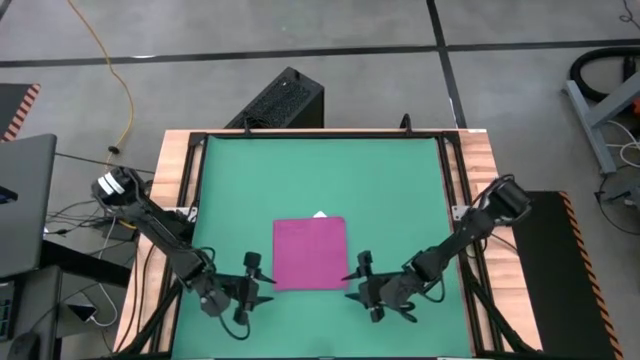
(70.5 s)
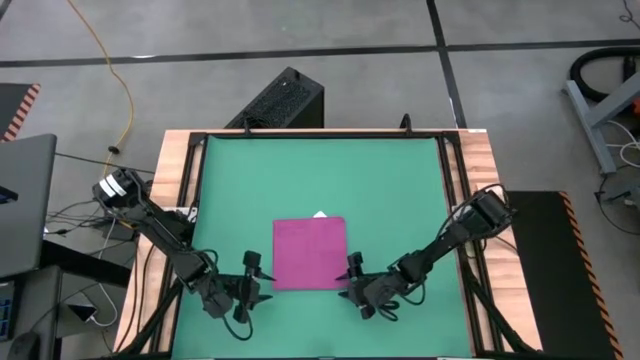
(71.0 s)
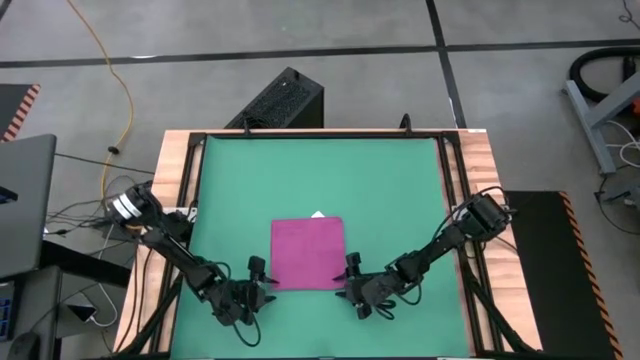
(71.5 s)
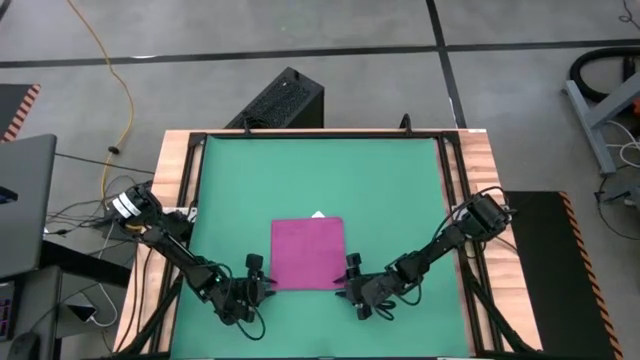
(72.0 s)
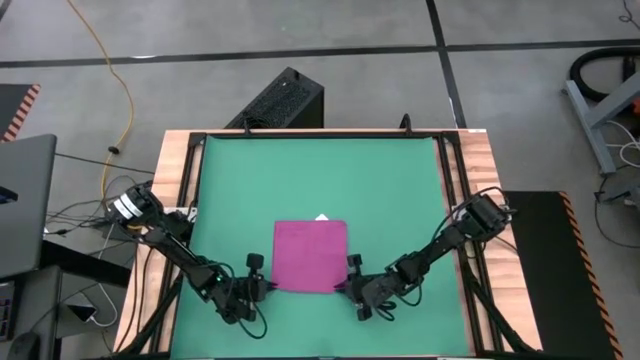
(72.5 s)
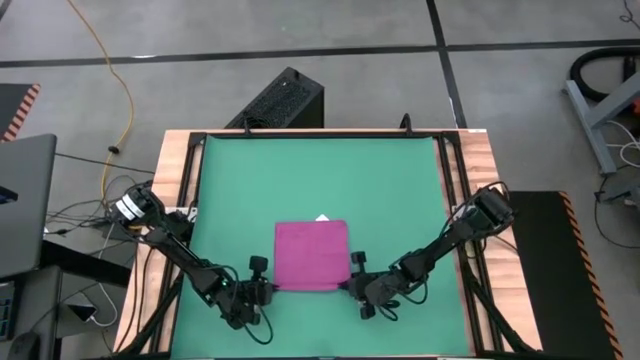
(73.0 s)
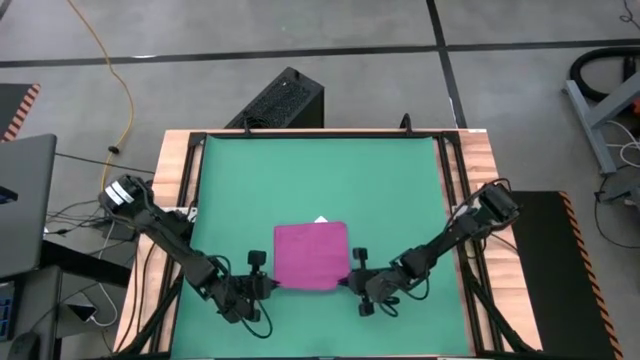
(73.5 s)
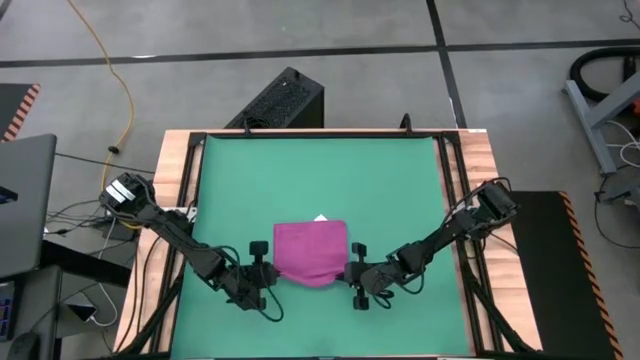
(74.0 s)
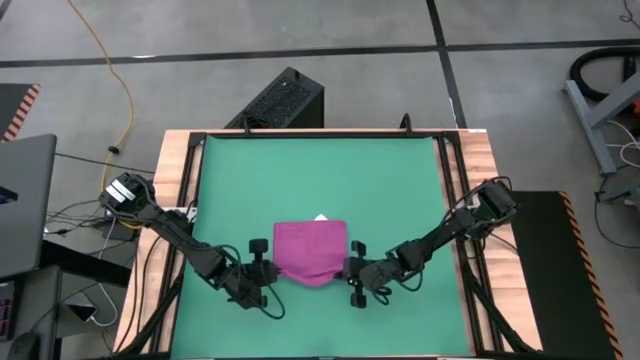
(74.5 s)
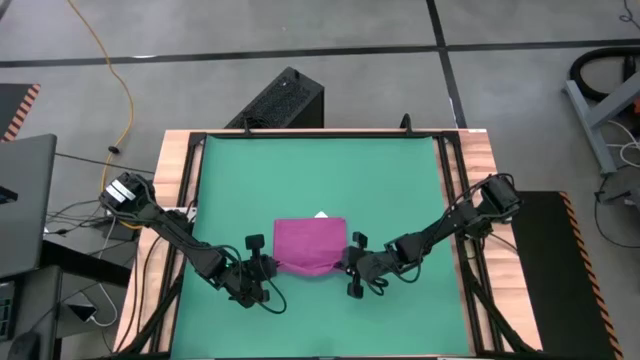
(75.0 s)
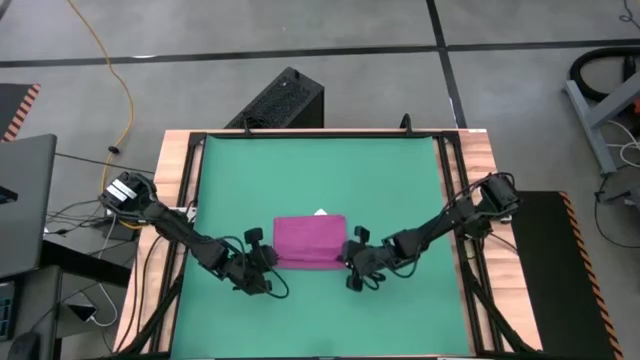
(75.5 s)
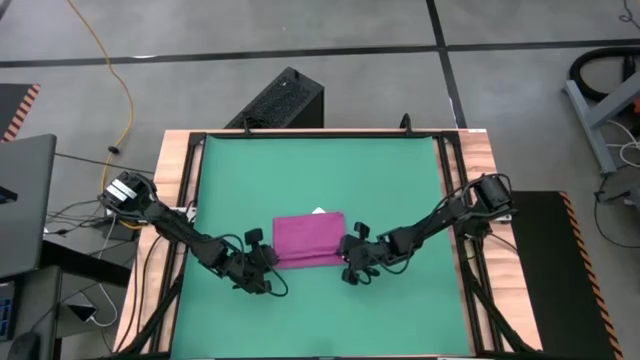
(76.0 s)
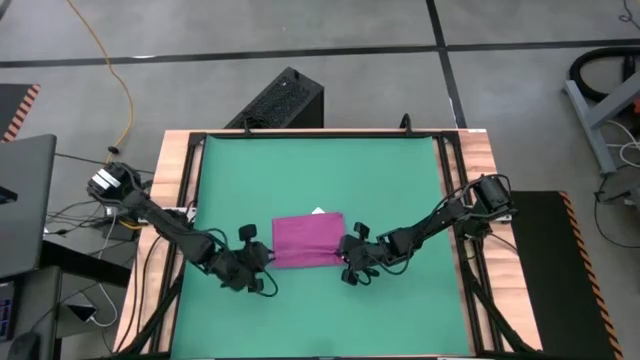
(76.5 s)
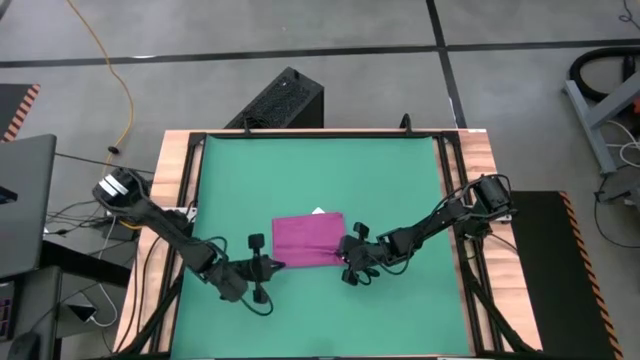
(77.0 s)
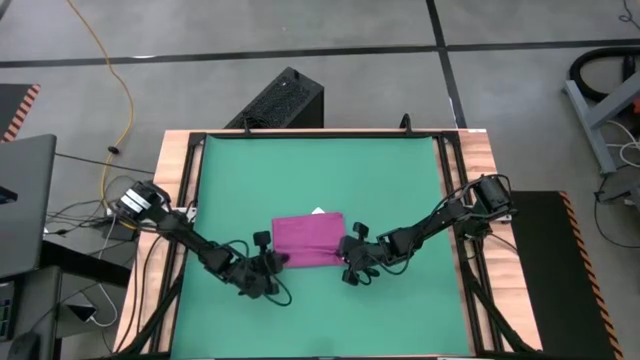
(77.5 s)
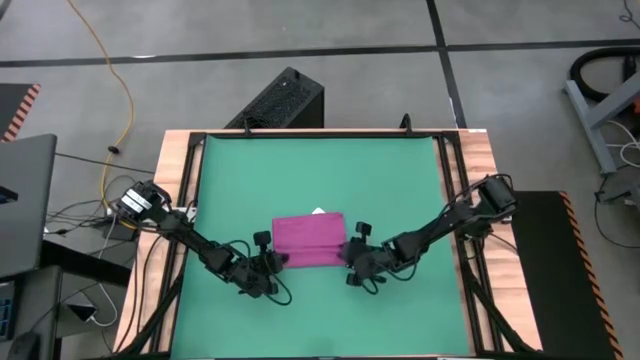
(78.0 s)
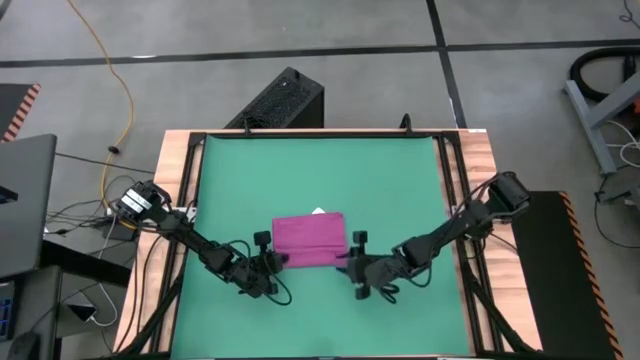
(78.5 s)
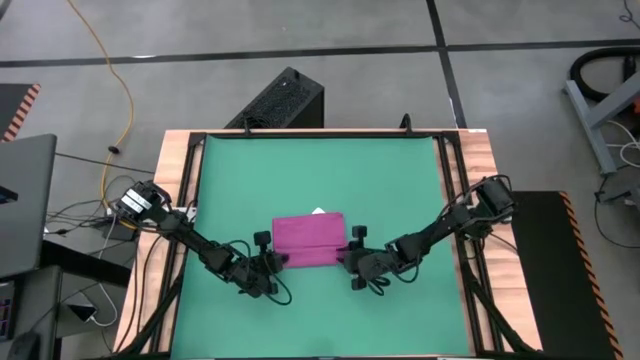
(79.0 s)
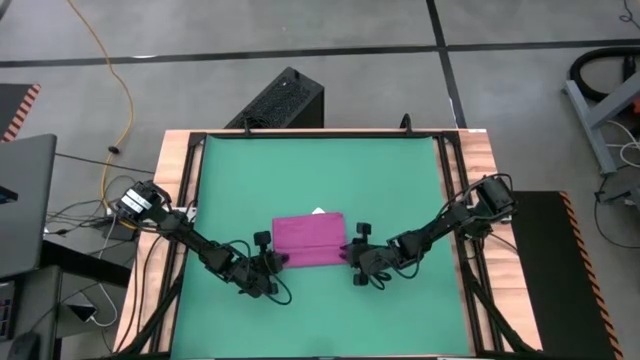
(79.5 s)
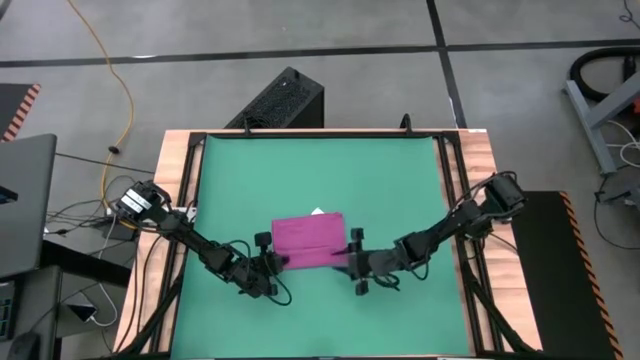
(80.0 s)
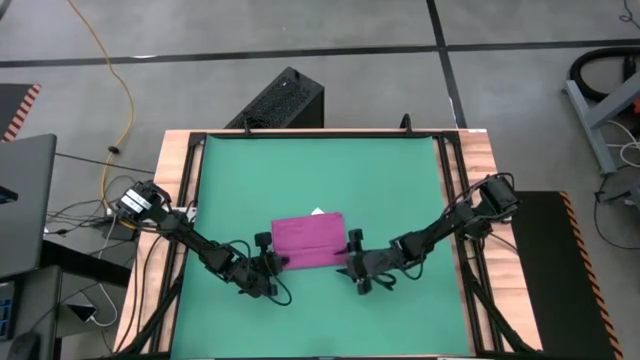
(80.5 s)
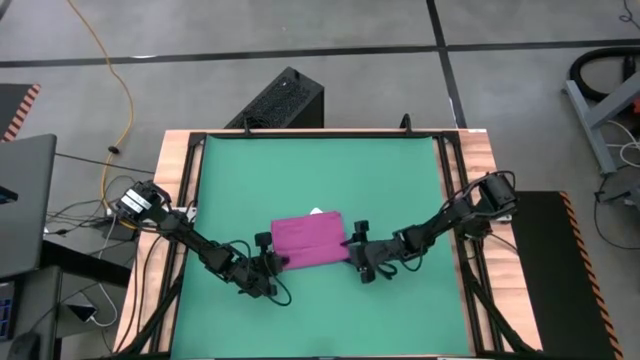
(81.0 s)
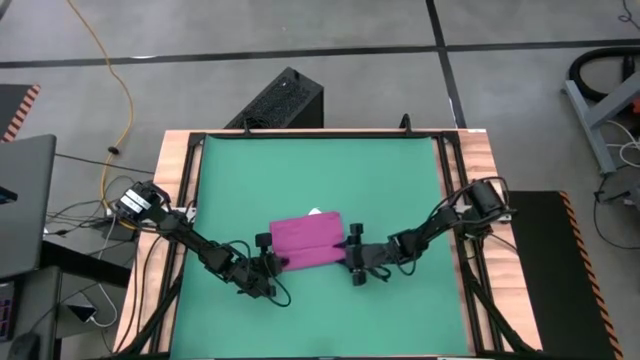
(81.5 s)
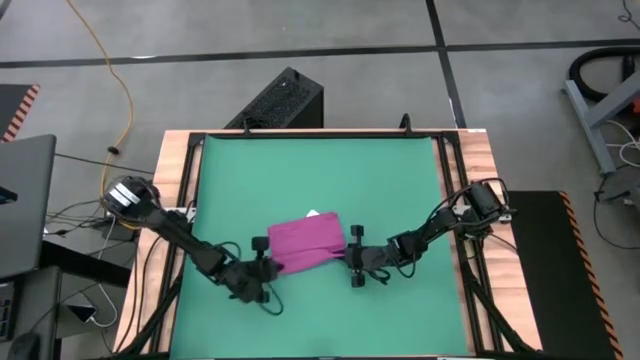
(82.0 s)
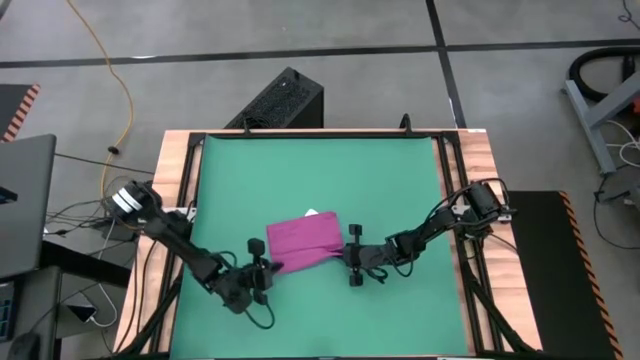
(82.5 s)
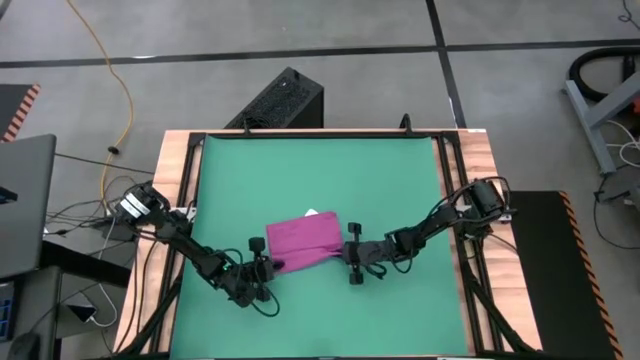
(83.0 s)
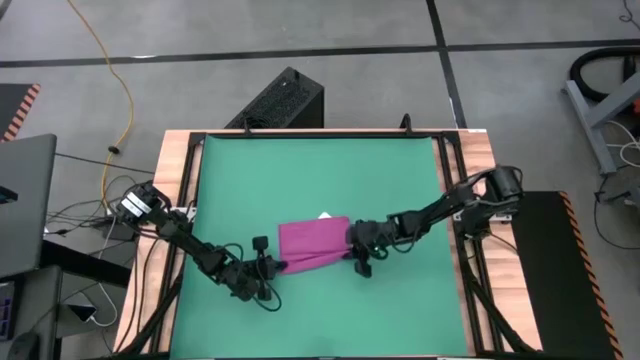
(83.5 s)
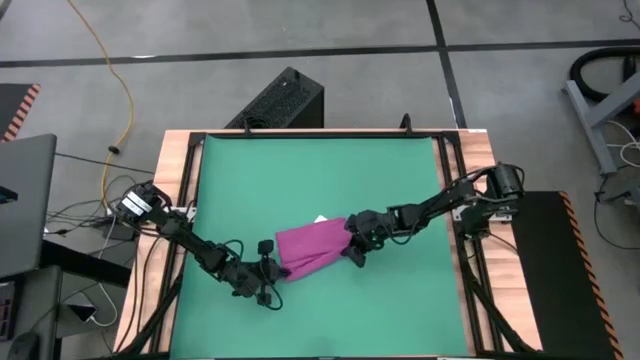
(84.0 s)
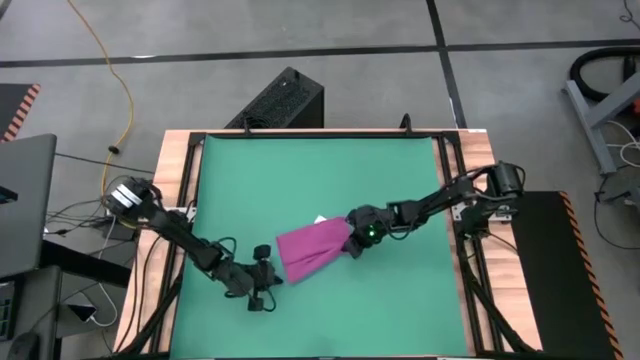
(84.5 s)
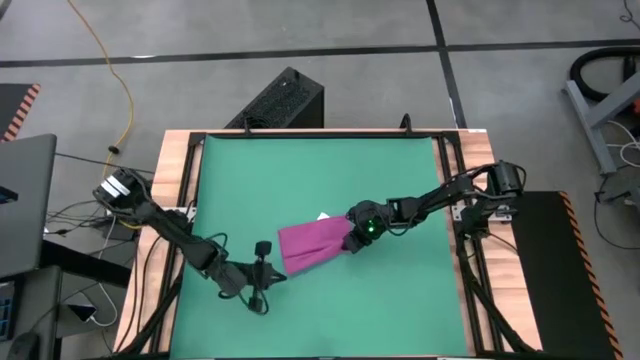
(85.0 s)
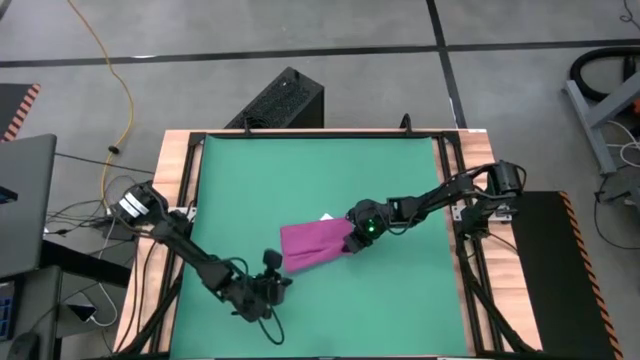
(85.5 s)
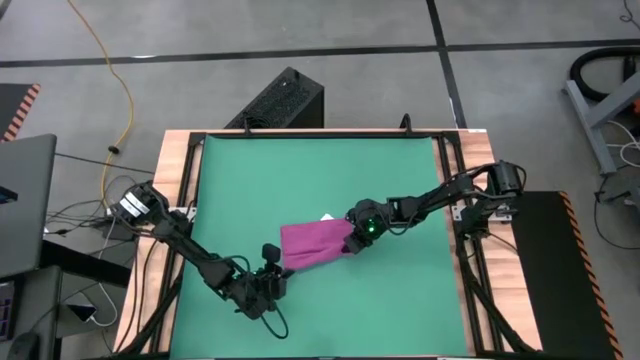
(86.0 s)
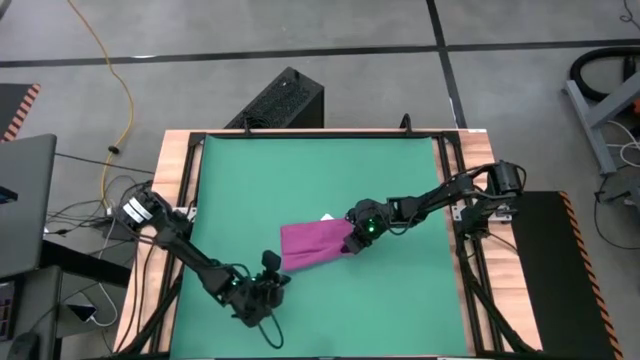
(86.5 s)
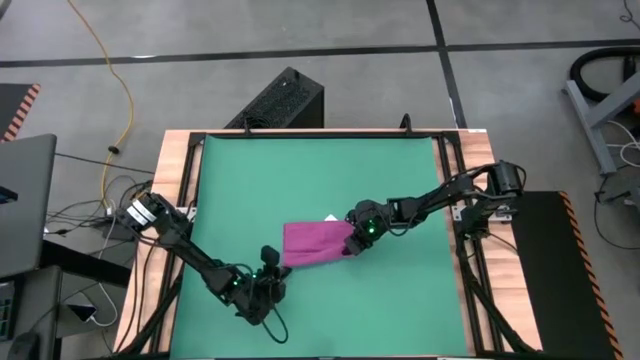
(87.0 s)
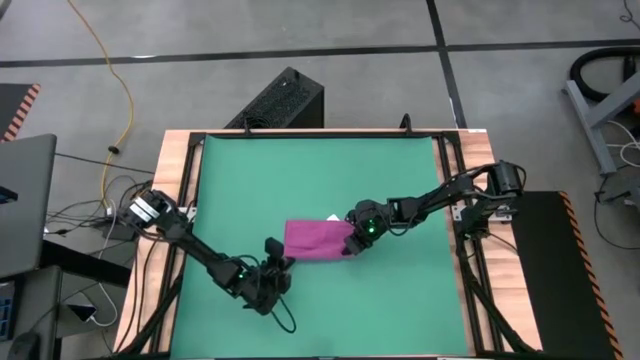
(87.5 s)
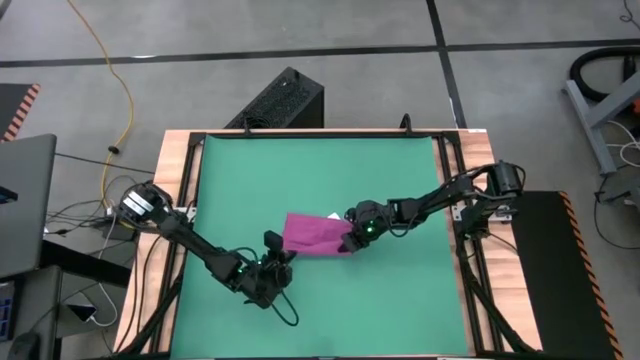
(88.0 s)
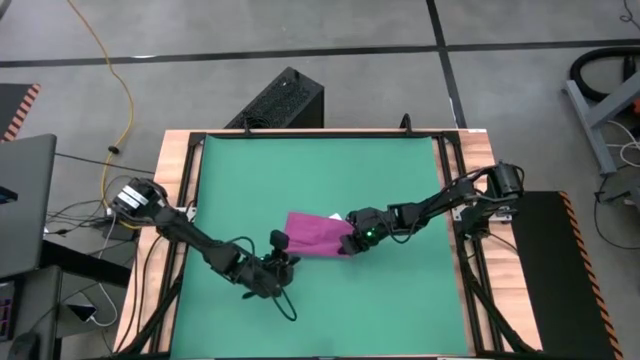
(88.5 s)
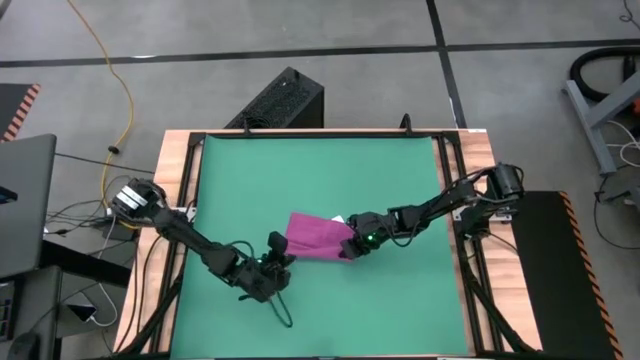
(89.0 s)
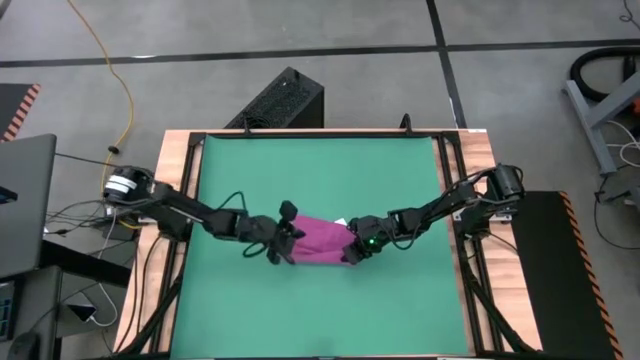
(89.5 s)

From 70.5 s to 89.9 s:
Task: Roll towel
Roll the violet towel
